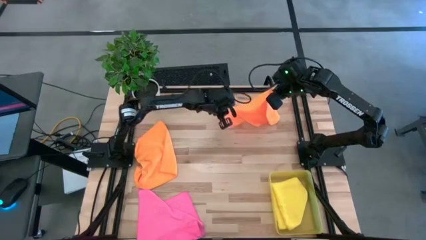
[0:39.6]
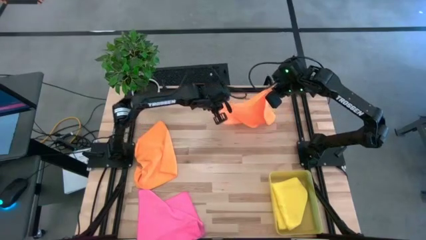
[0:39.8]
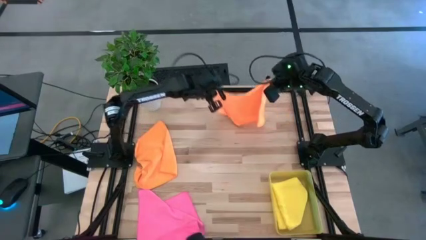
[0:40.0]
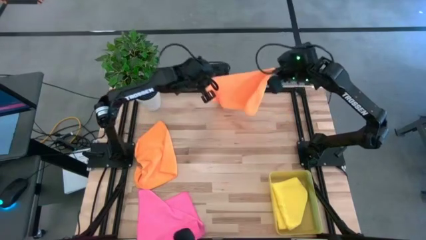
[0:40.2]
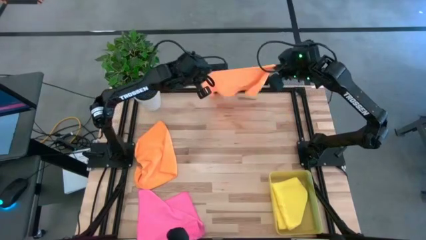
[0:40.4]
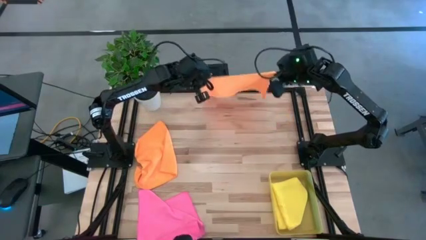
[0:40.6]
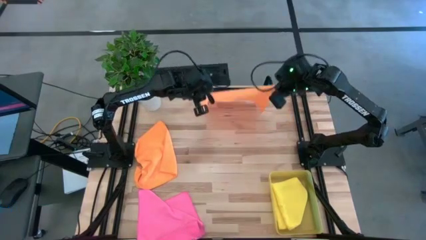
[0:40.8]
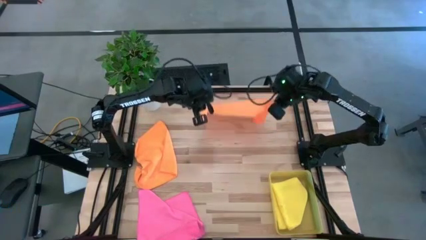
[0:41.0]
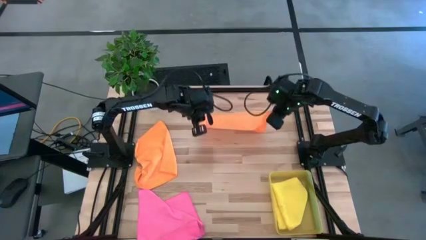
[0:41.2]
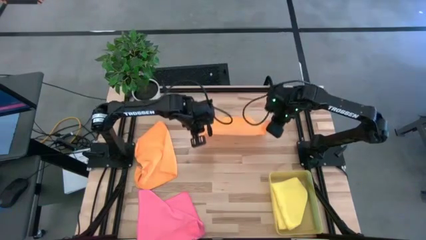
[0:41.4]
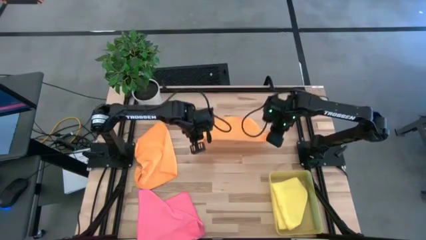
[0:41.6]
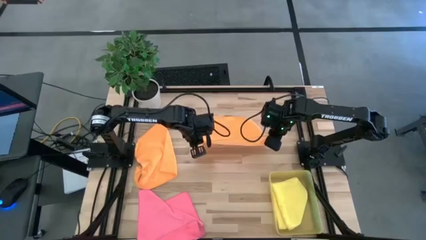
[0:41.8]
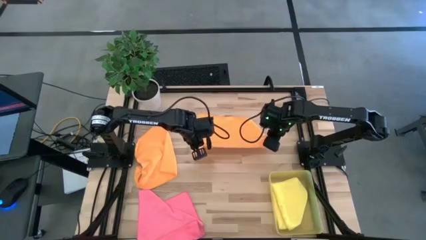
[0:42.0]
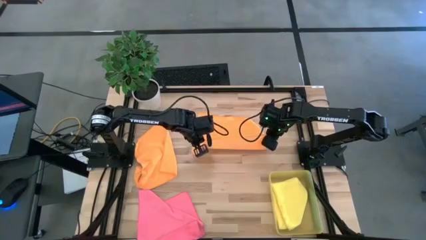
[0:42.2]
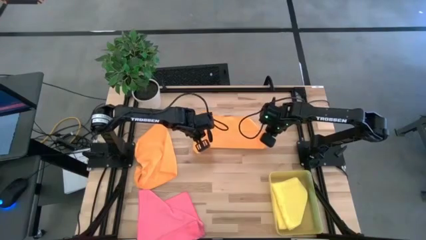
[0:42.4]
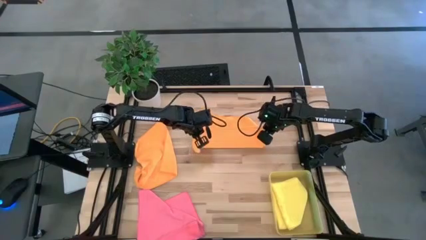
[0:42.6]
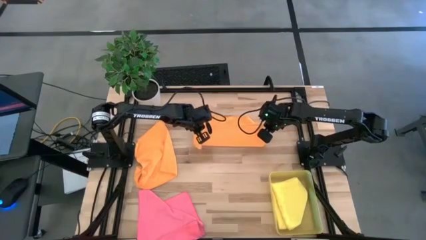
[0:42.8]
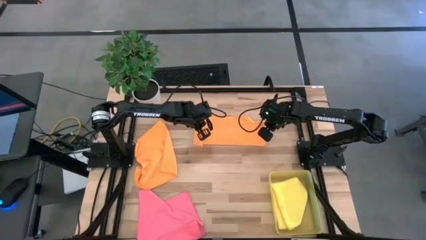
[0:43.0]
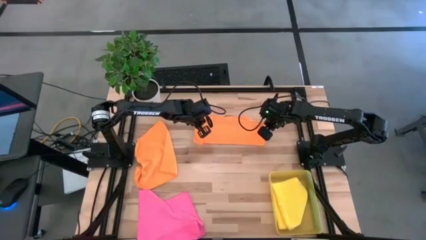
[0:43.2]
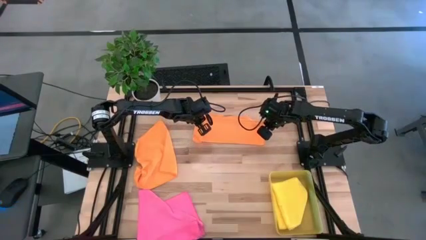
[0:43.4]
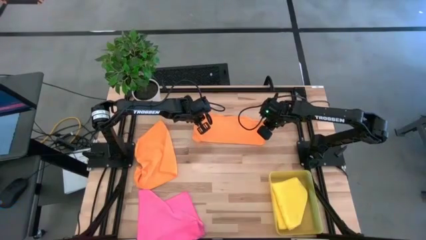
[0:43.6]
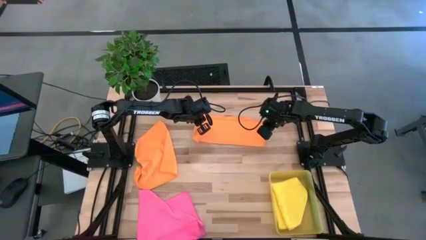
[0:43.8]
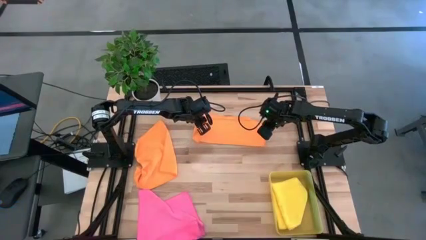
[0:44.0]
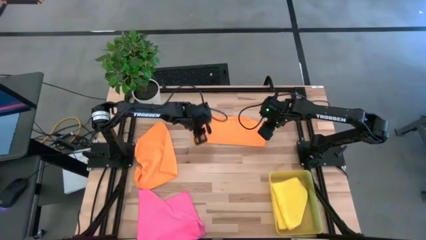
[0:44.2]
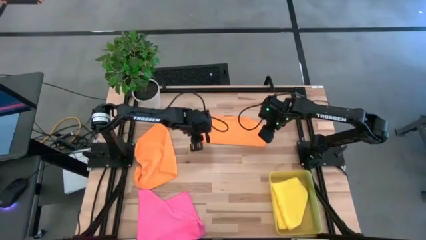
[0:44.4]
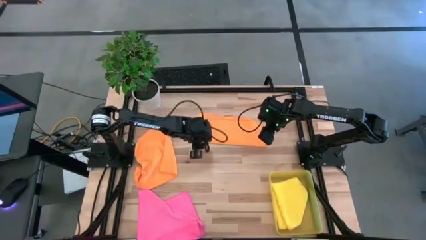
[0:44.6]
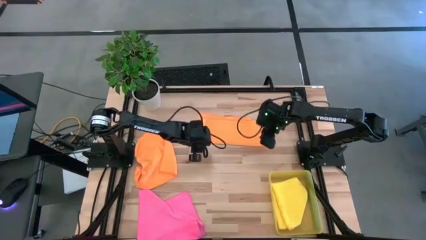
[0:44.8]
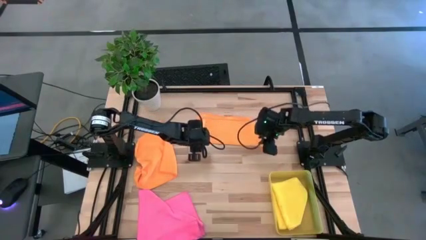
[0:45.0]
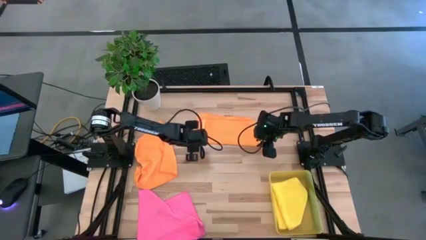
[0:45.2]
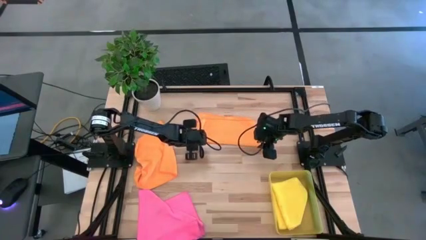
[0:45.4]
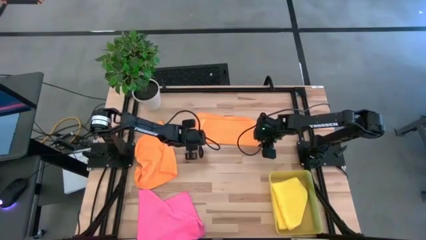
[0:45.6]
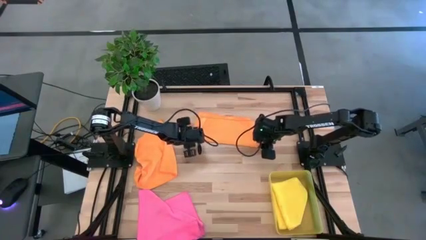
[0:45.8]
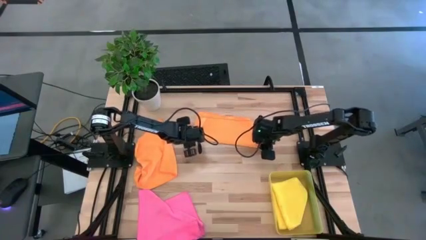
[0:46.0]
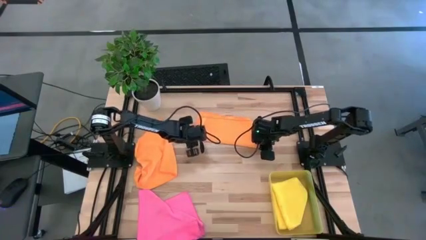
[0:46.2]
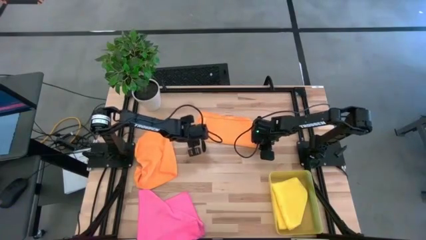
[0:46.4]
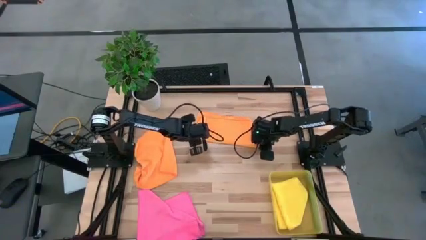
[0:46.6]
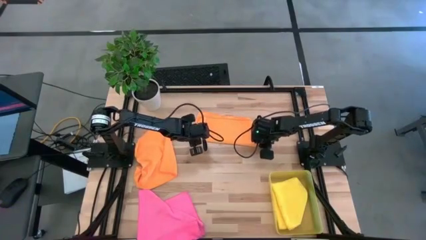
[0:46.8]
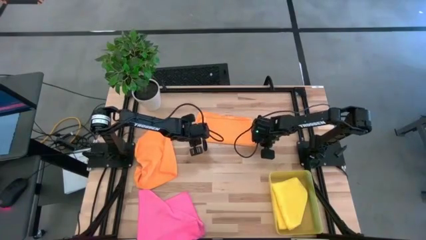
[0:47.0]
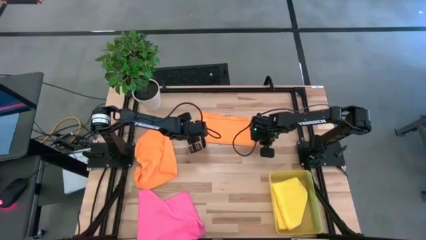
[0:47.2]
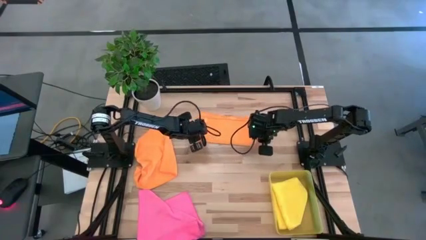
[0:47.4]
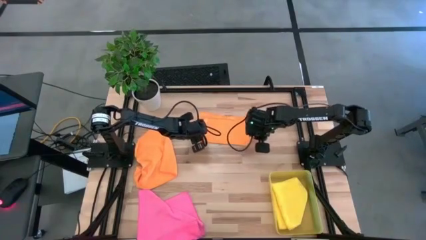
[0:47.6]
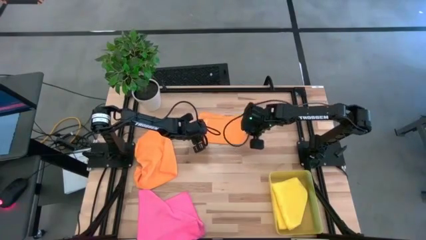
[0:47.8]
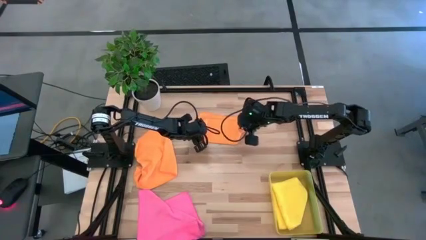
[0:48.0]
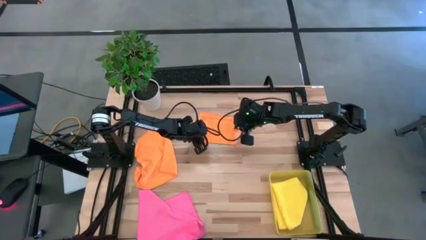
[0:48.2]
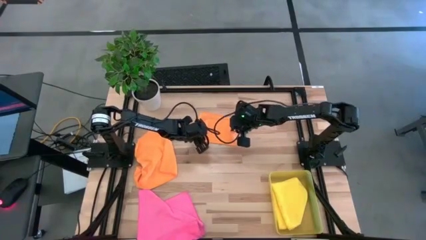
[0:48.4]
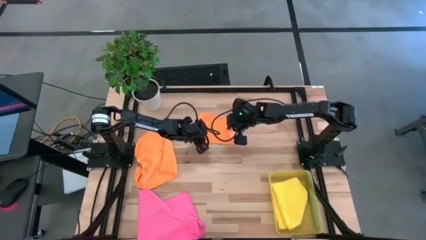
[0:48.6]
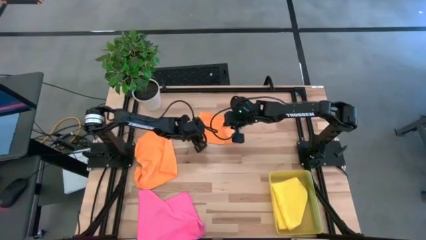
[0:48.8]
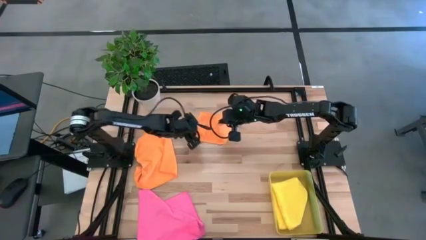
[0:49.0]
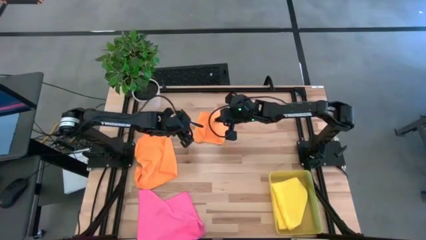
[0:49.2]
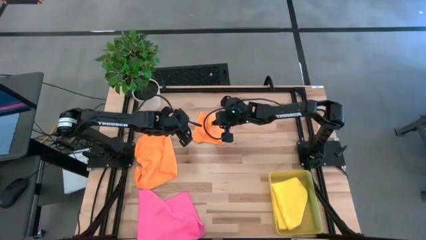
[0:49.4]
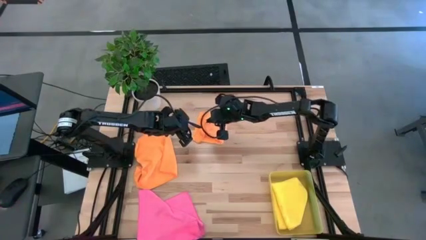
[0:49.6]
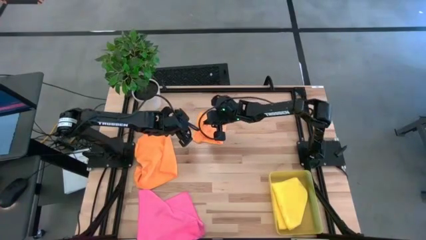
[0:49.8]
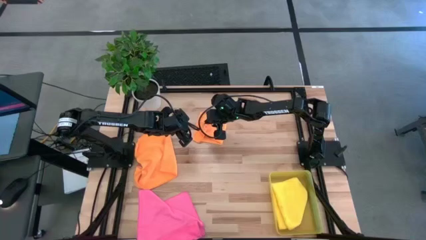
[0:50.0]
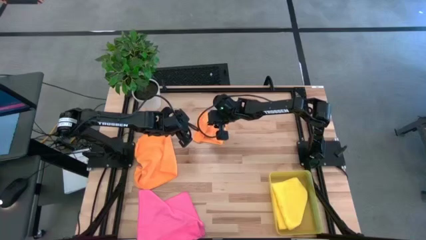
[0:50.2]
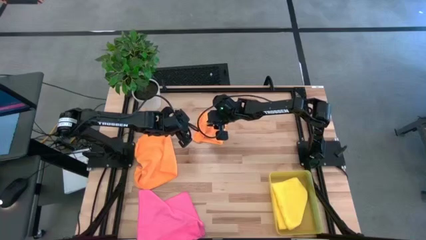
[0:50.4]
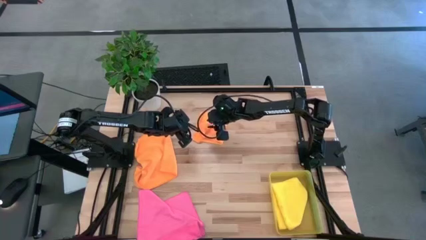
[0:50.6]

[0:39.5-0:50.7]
Task: Fold microfiber towels
Fold the top right orange cloth

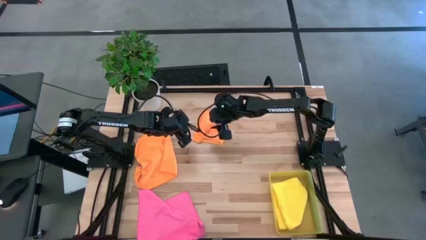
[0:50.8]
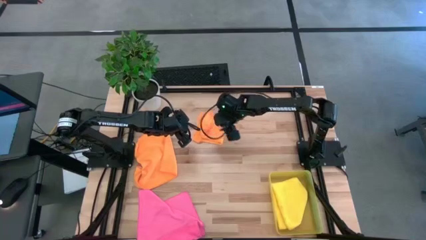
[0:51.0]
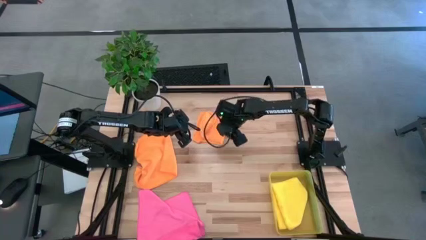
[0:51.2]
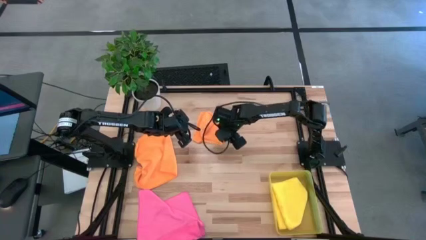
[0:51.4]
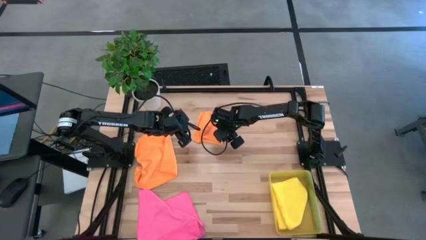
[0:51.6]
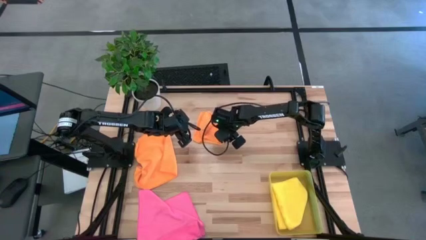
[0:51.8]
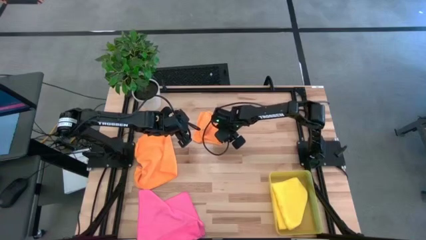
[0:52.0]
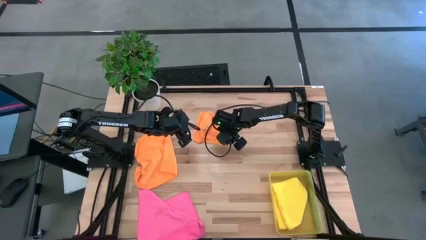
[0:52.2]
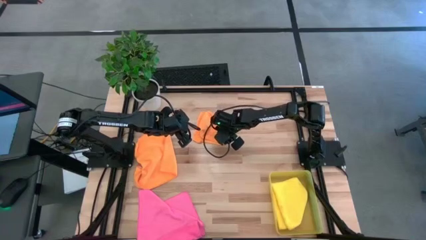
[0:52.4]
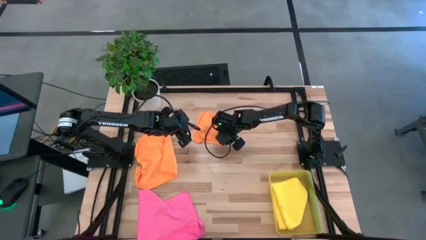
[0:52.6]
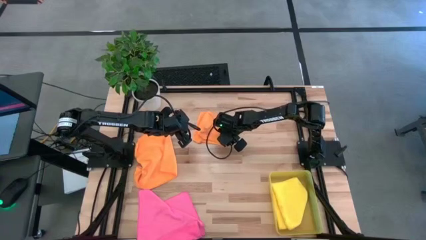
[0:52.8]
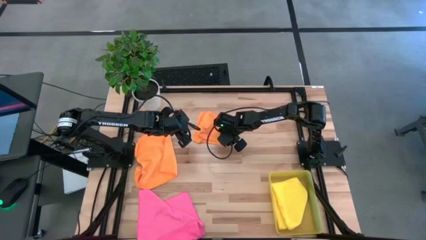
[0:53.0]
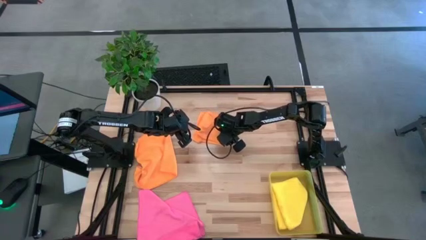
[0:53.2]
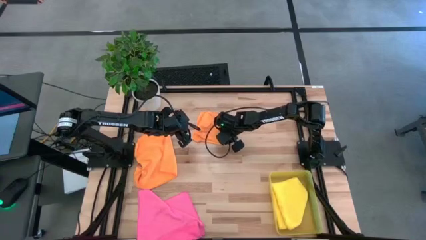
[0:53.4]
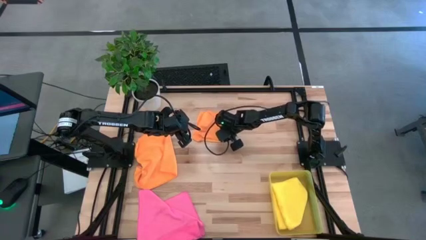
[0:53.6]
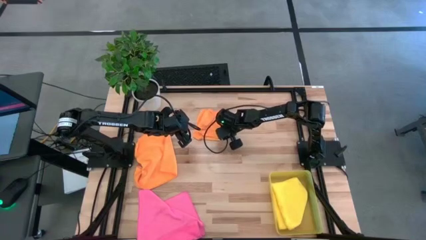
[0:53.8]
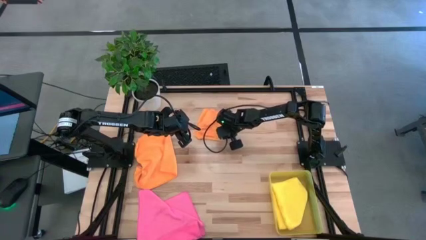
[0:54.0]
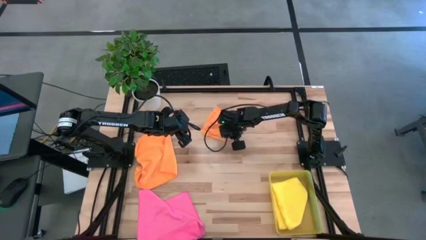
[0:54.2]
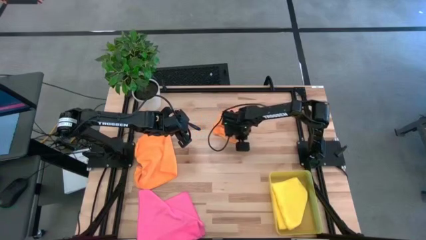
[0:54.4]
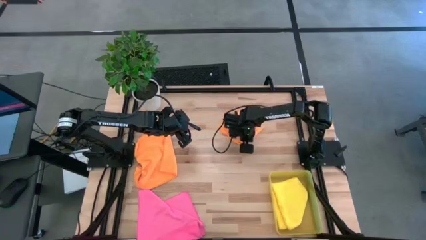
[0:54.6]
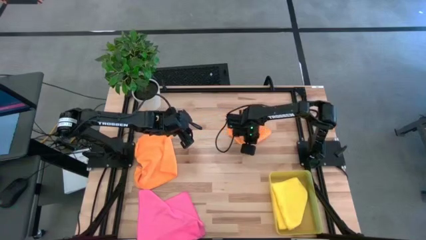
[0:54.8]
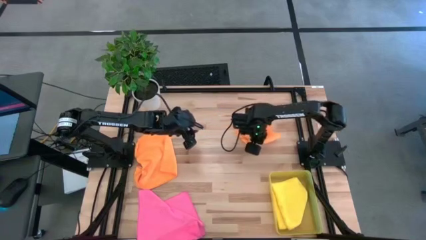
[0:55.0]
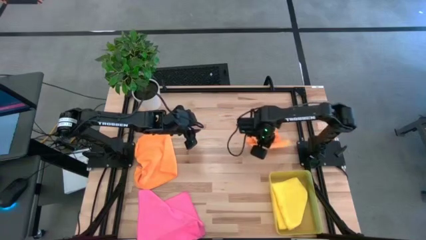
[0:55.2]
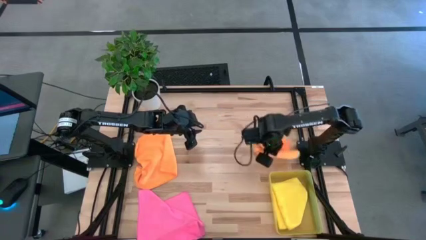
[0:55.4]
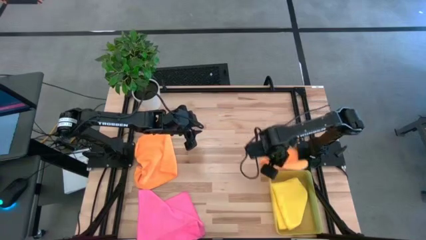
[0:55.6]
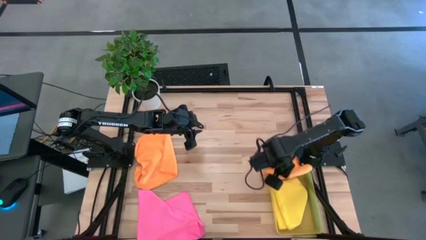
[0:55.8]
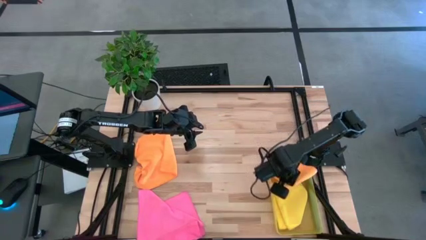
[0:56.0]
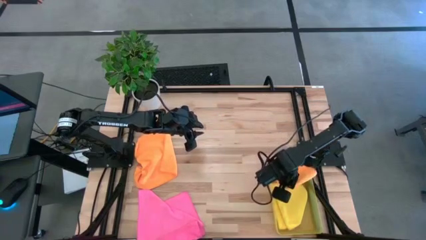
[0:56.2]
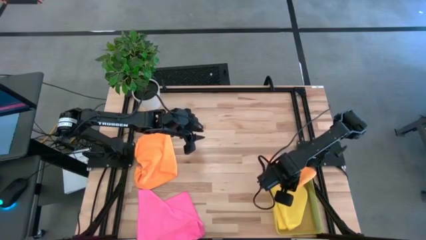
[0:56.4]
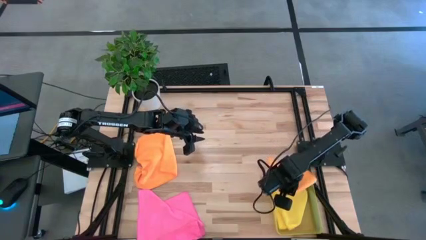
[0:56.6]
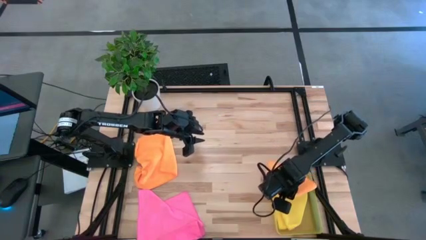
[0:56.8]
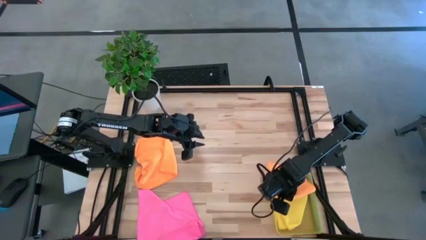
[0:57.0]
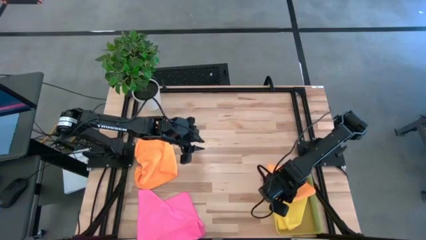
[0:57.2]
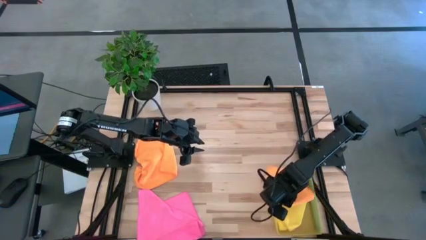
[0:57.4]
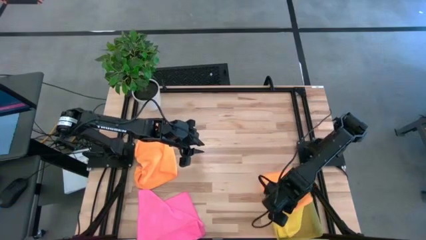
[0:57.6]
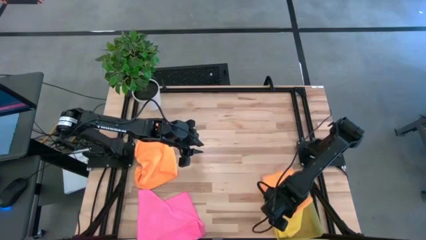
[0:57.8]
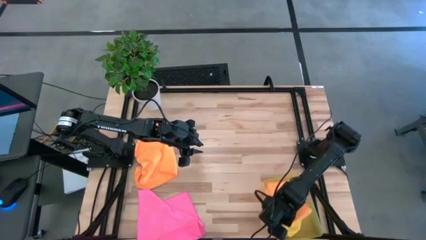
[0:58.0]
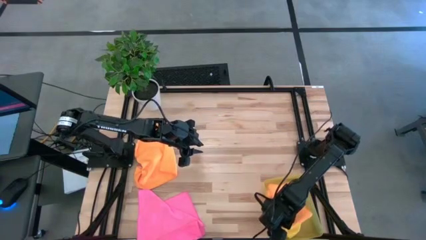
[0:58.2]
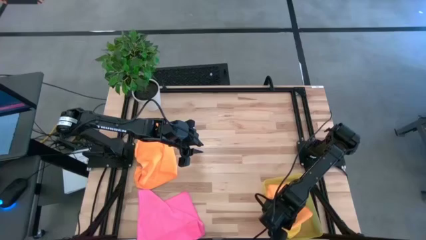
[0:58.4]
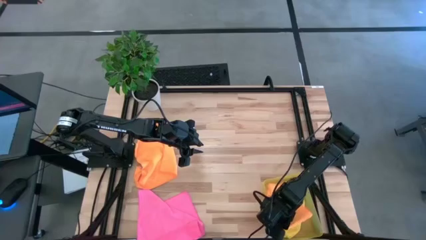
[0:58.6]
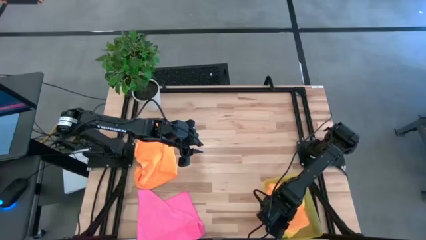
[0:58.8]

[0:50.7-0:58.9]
Stack the top folded orange cloth on top of the folded yellow cloth in the yellow bin
